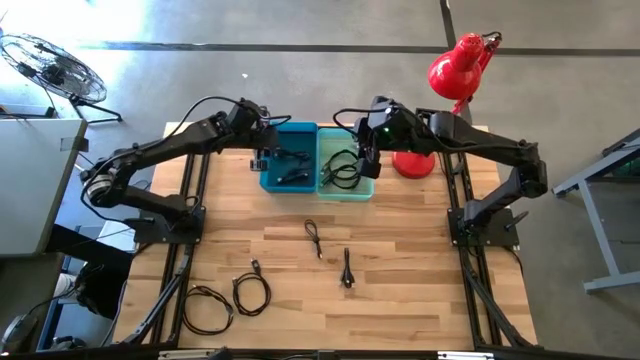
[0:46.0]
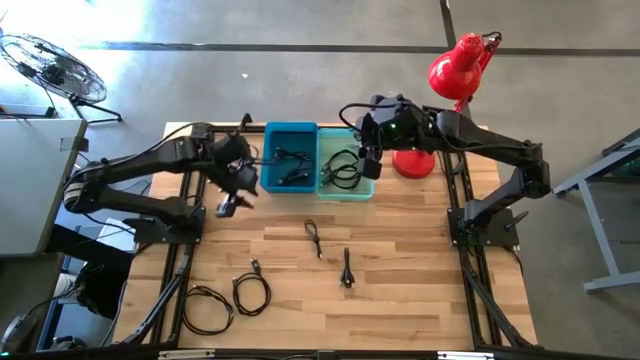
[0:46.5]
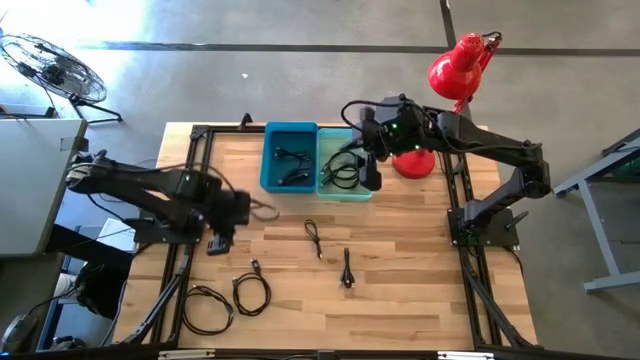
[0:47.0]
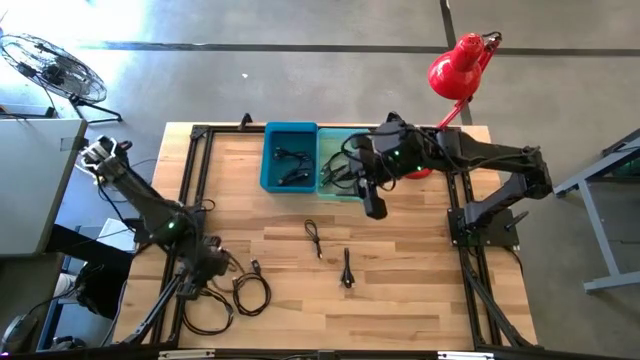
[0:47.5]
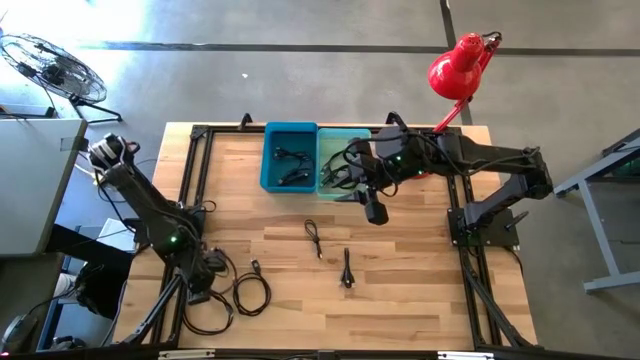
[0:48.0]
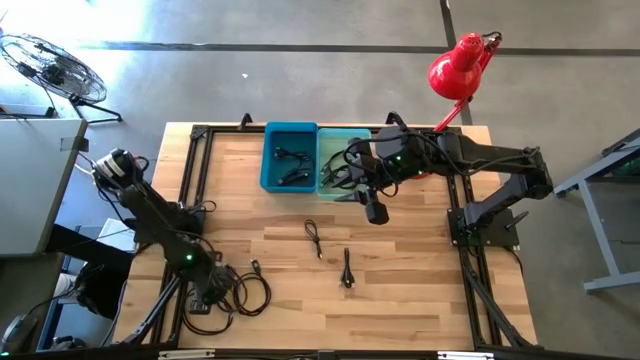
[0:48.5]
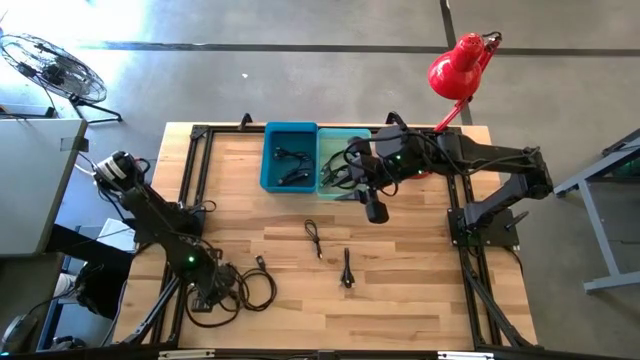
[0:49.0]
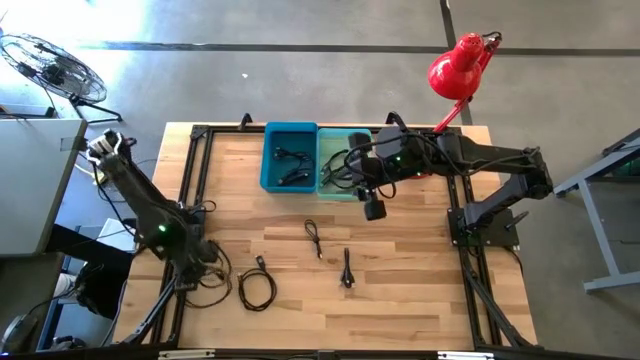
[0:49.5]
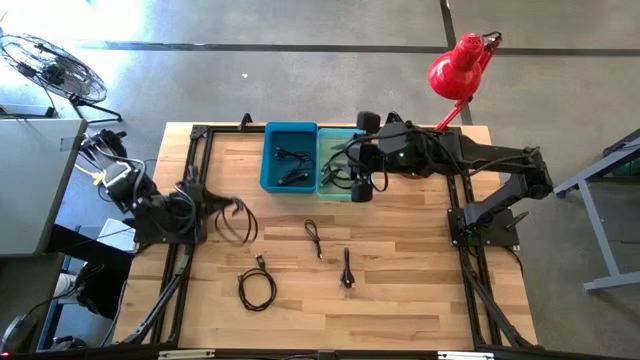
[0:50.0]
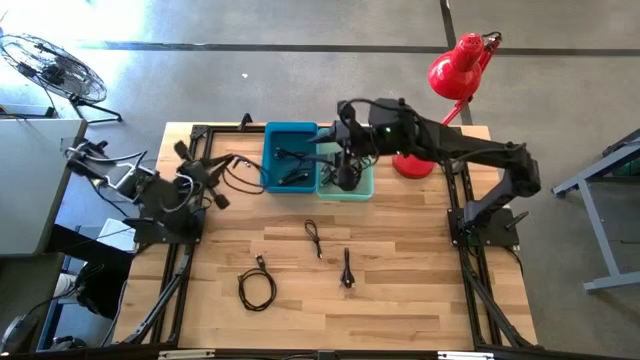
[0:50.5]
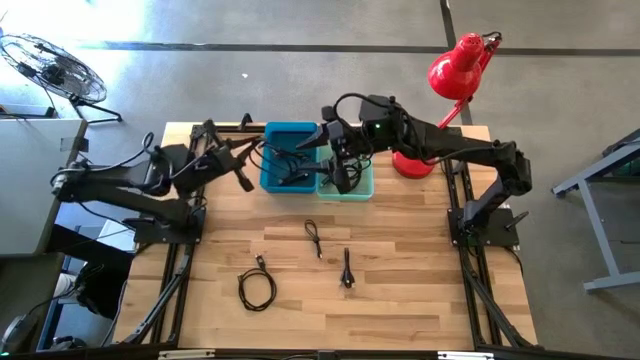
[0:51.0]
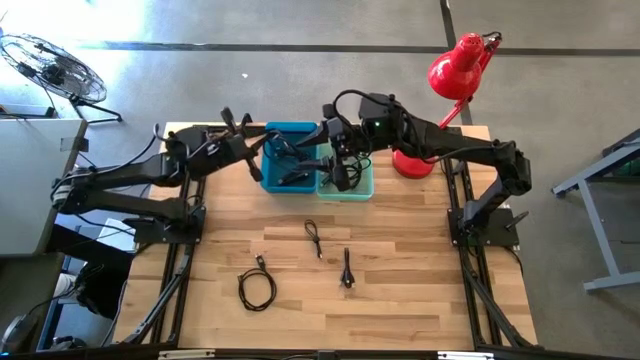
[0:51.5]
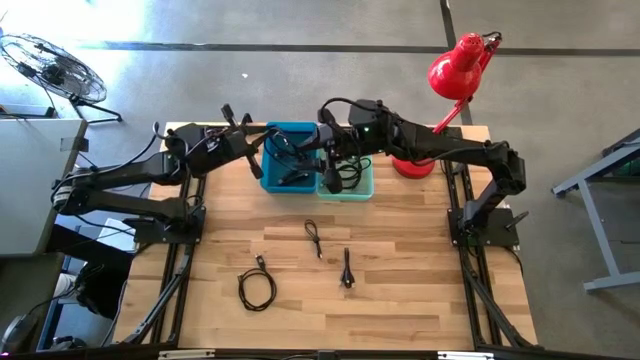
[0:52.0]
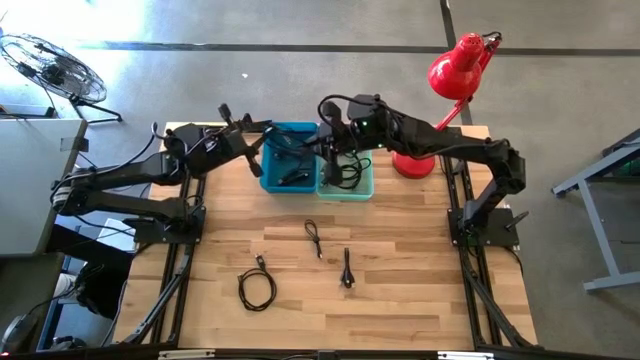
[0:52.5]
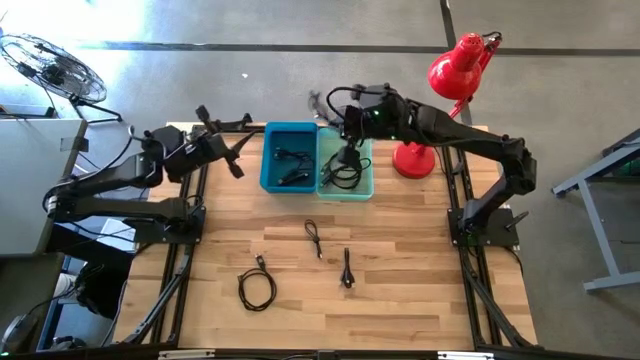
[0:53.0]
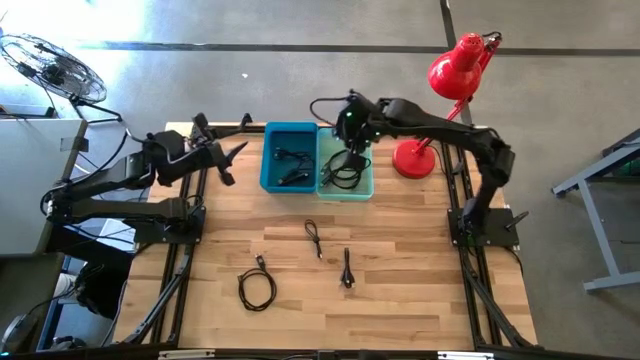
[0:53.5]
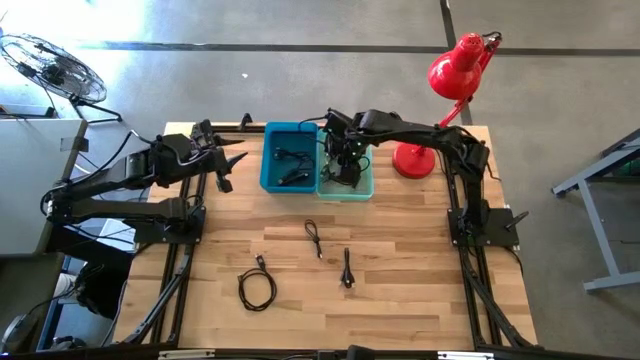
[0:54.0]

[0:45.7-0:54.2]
Task: Pick & Place USB Port
Put the black USB cable into the green bin

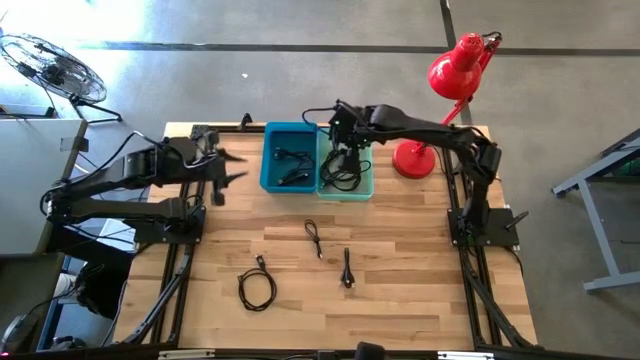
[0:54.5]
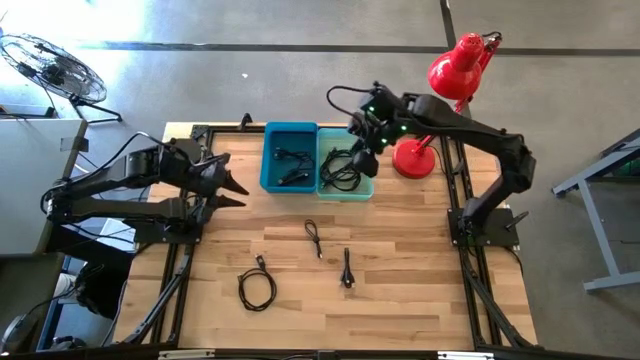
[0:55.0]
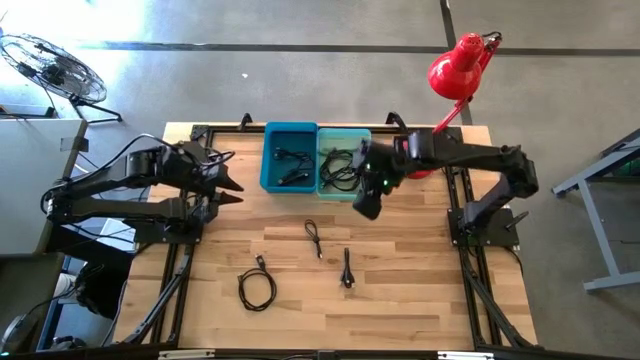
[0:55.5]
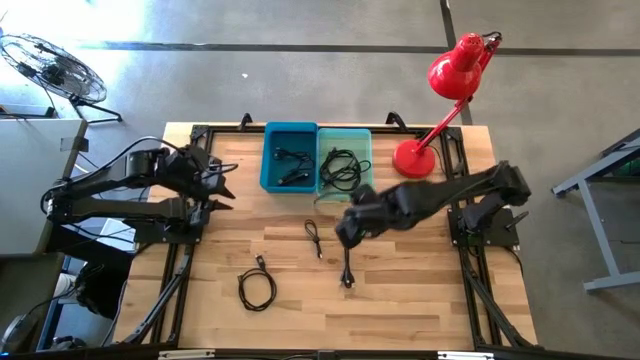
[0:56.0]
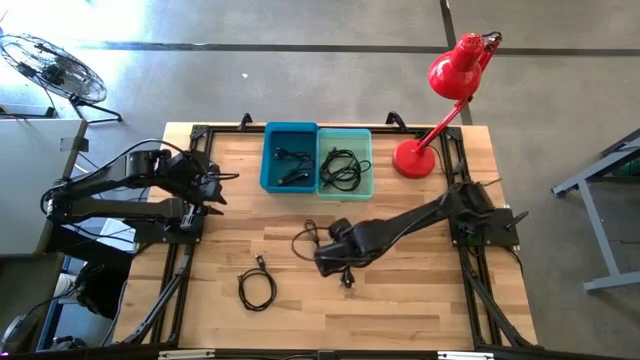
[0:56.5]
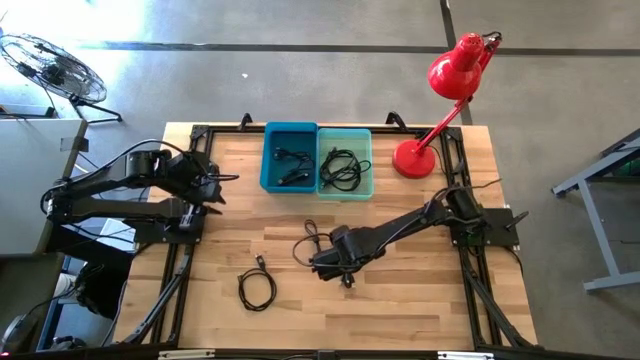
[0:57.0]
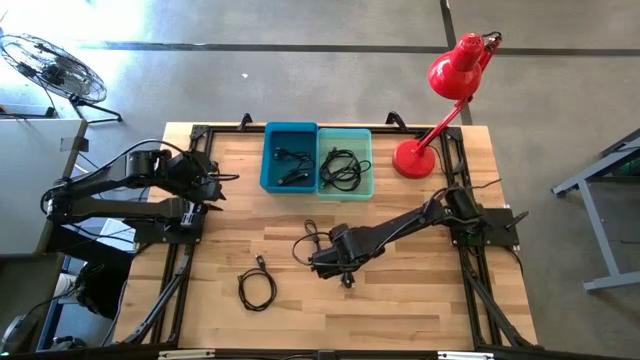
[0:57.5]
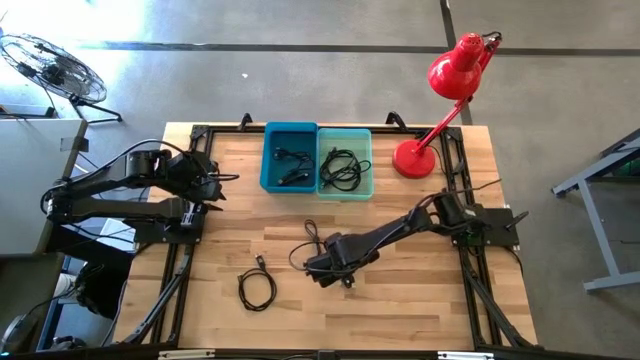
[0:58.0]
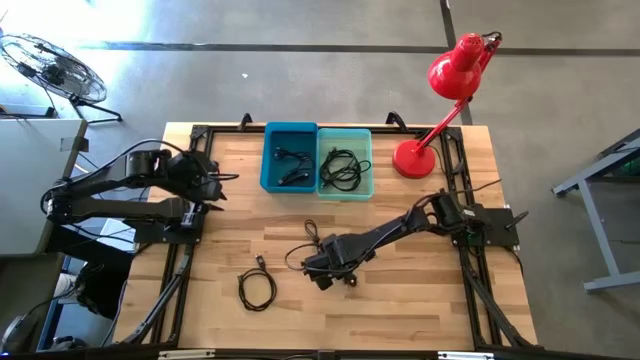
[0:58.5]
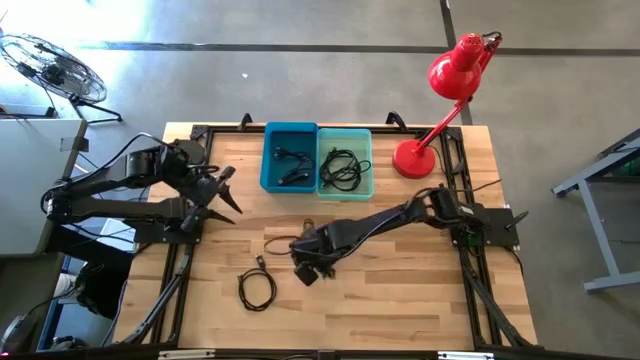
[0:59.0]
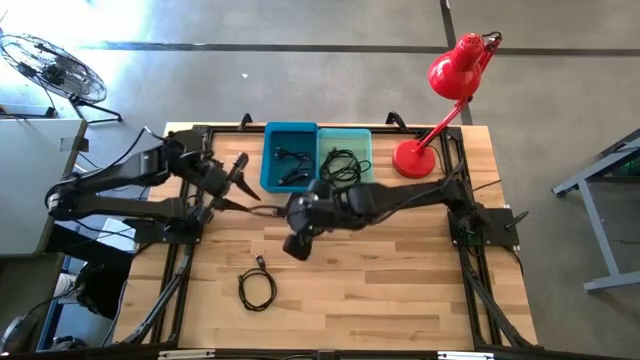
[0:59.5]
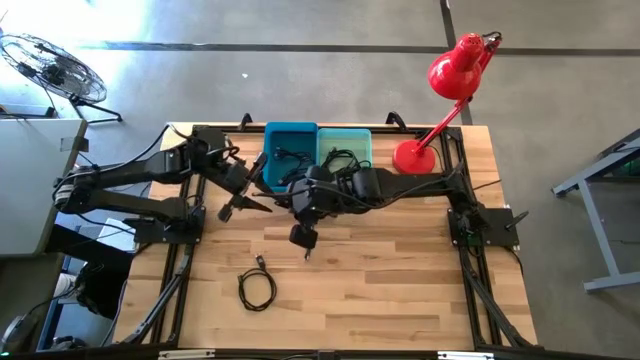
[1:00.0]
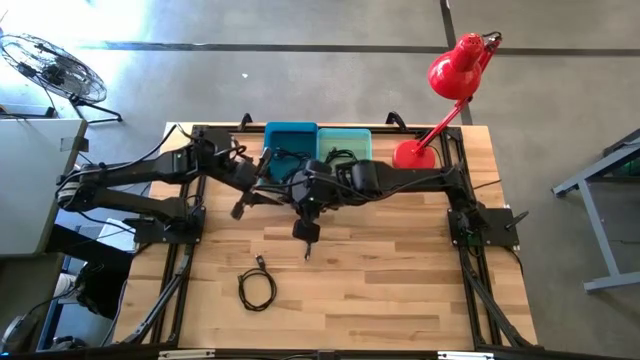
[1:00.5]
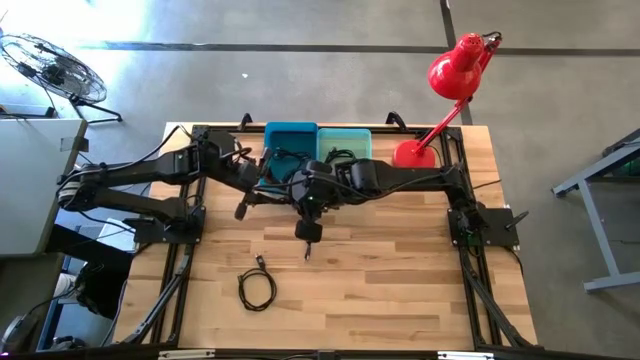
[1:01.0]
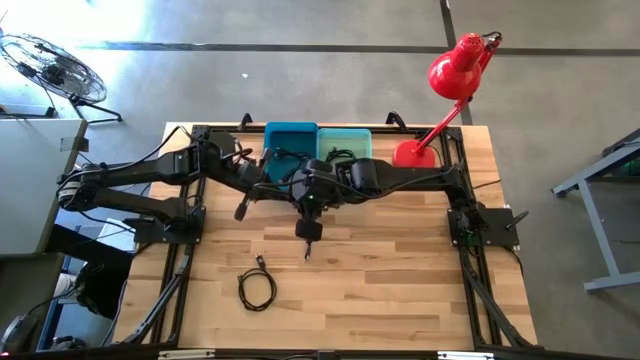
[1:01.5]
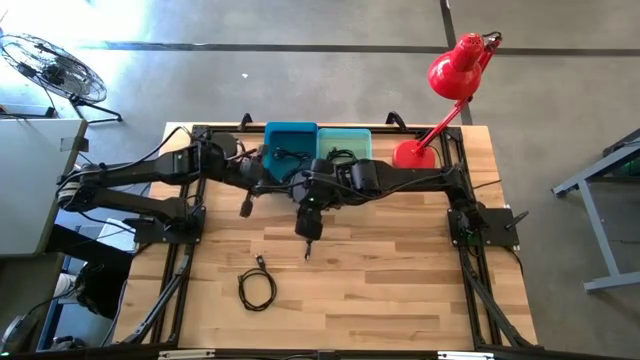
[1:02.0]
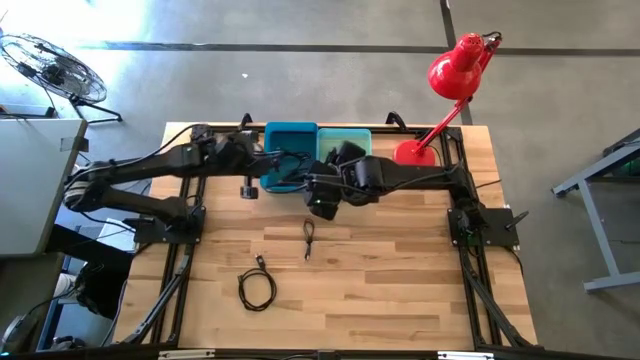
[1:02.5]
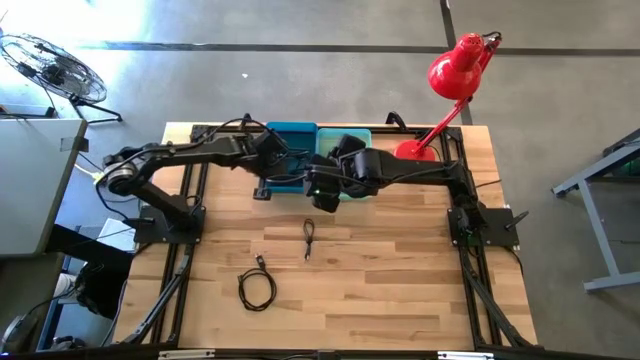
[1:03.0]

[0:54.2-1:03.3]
Put the black USB cable into the blue bin

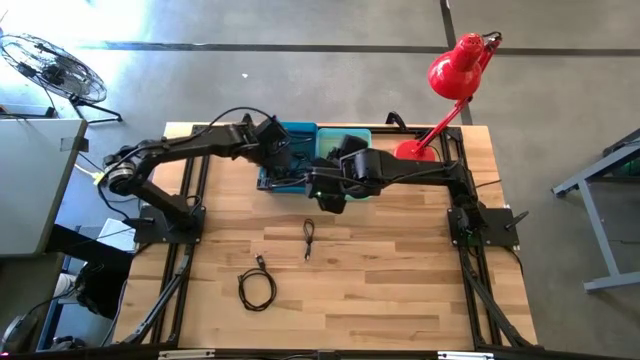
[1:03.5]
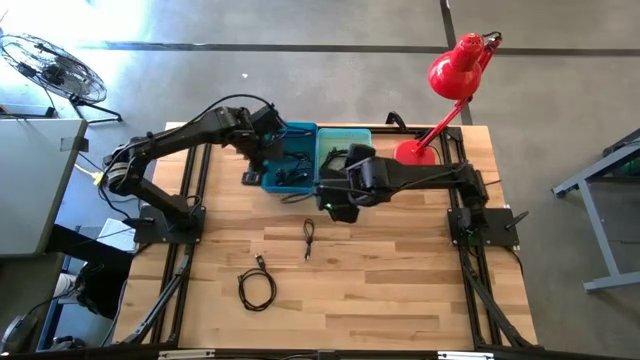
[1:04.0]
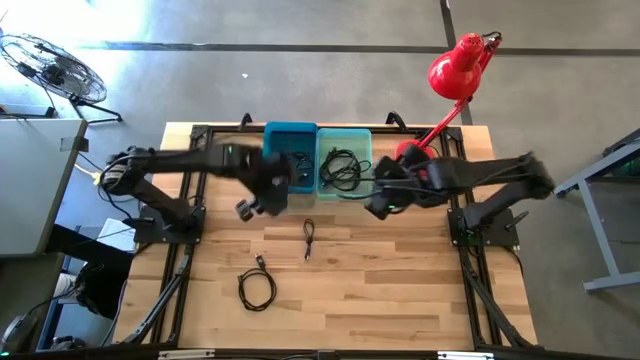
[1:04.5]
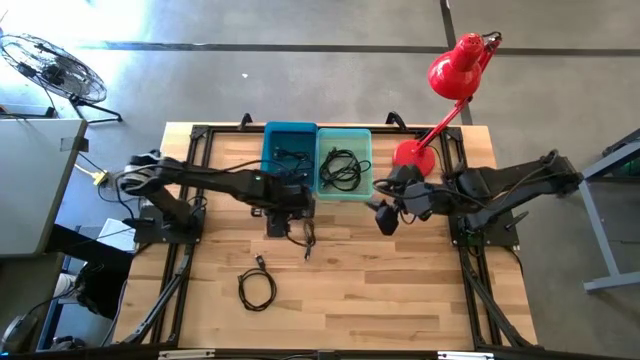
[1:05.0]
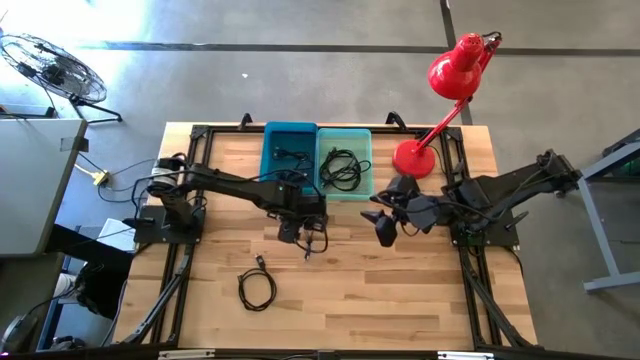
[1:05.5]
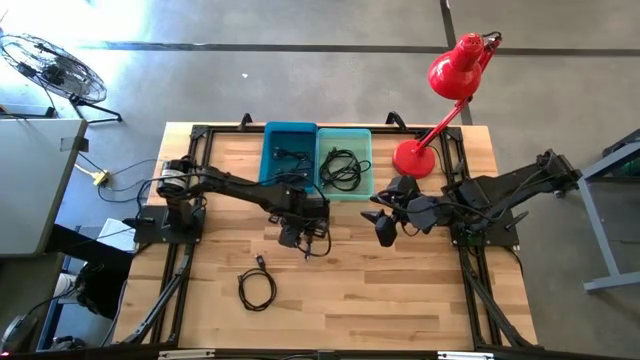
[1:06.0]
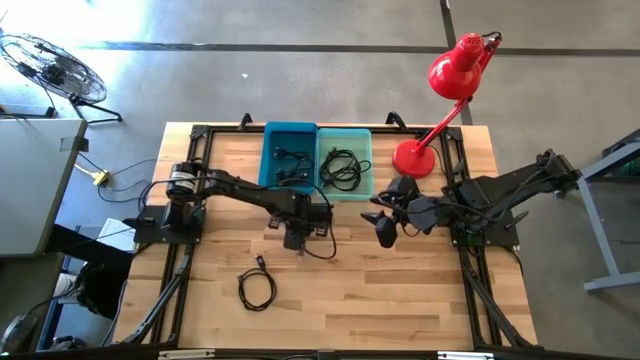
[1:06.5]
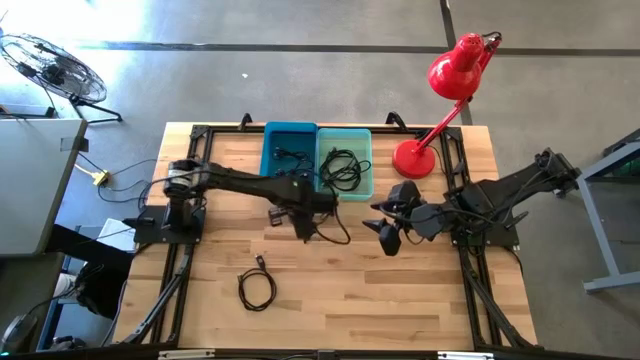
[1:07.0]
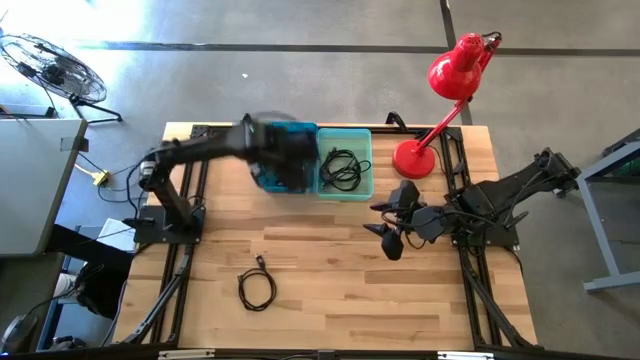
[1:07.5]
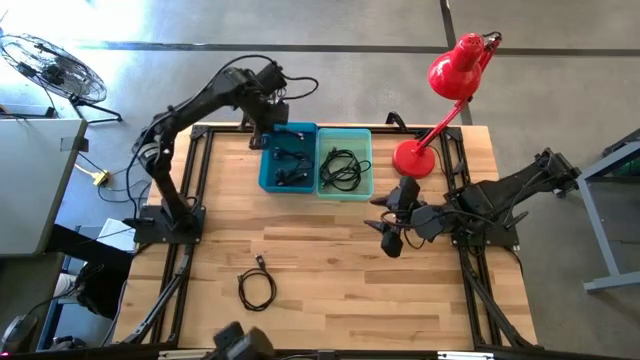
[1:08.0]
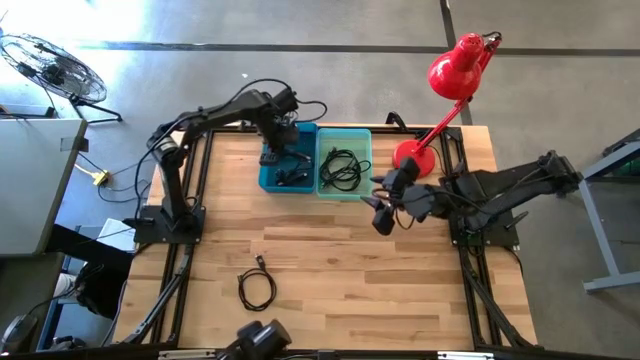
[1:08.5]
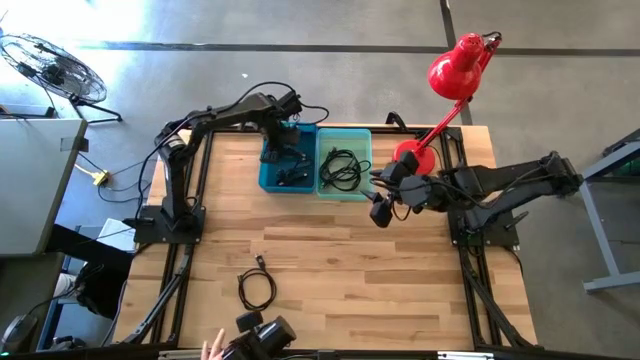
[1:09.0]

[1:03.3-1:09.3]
Put the black USB cable into the blue bin
